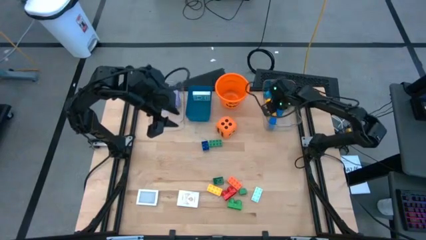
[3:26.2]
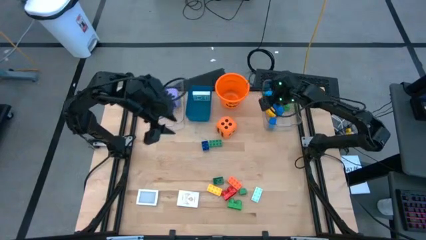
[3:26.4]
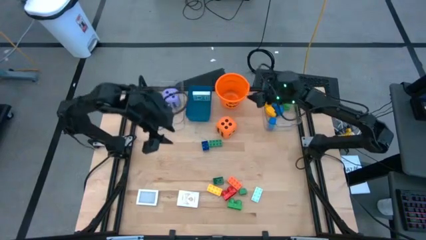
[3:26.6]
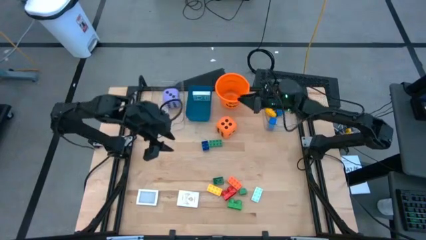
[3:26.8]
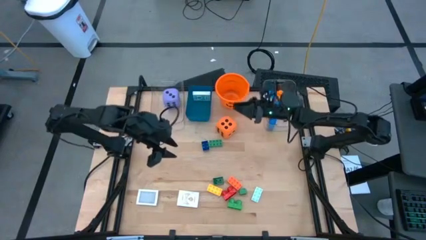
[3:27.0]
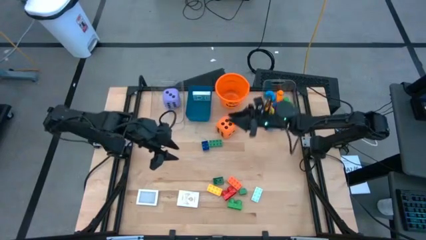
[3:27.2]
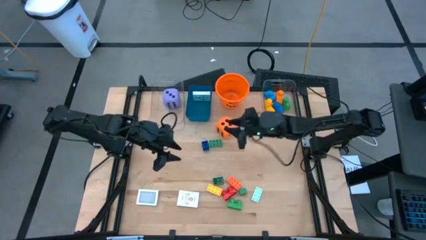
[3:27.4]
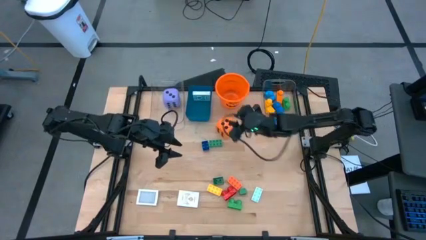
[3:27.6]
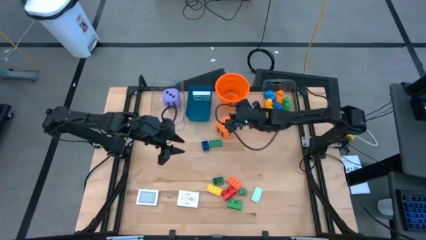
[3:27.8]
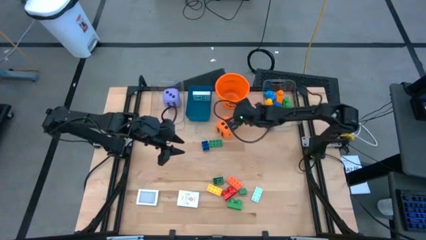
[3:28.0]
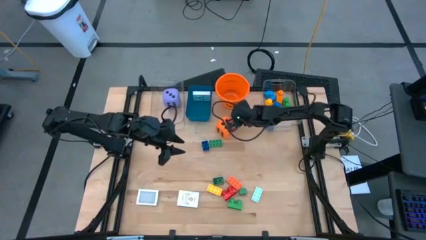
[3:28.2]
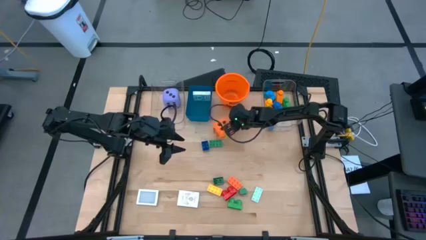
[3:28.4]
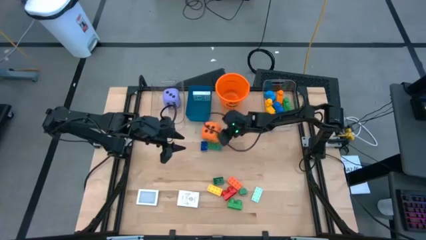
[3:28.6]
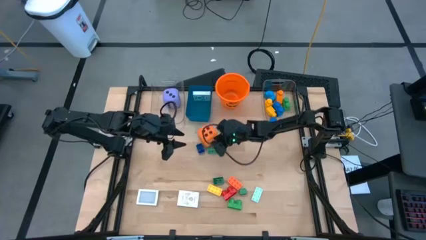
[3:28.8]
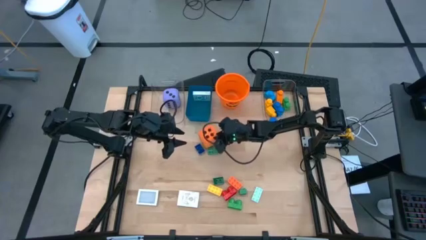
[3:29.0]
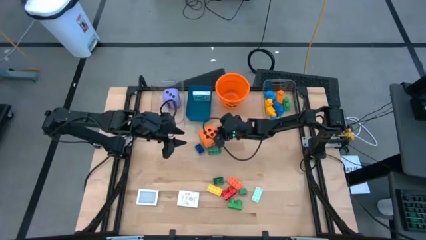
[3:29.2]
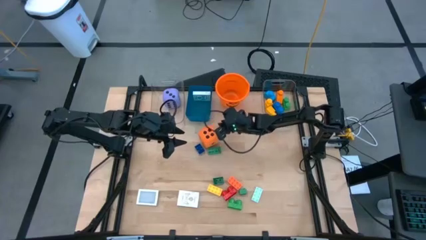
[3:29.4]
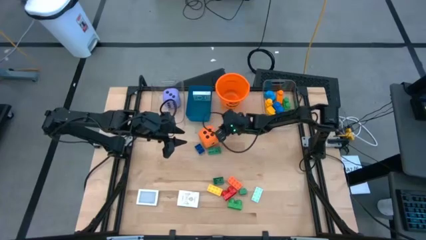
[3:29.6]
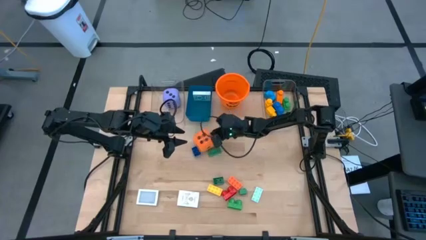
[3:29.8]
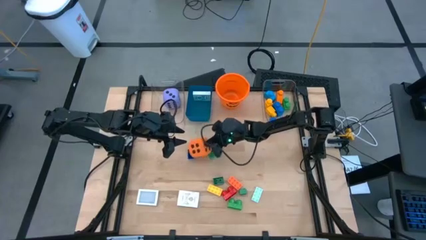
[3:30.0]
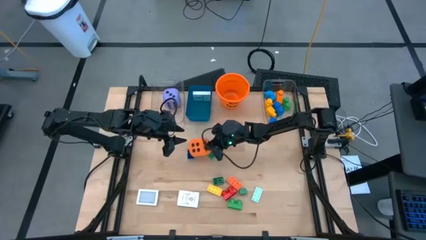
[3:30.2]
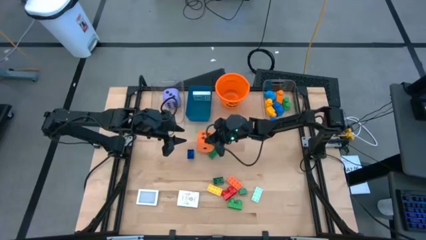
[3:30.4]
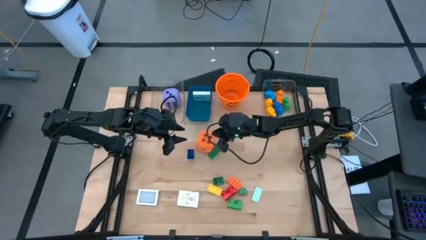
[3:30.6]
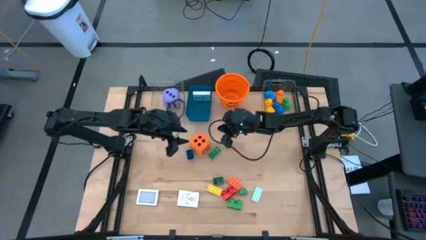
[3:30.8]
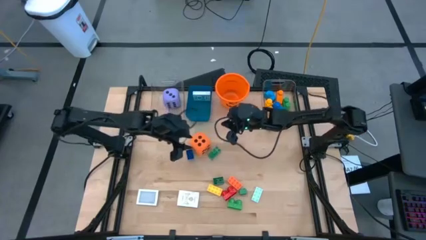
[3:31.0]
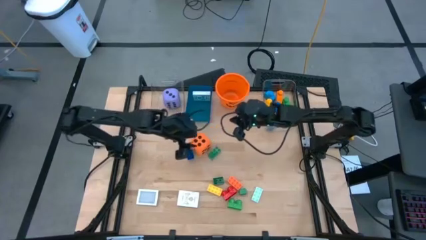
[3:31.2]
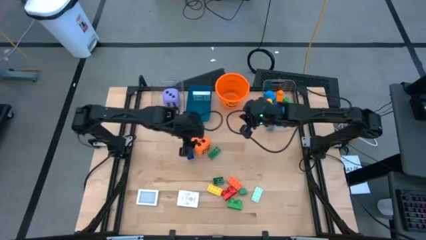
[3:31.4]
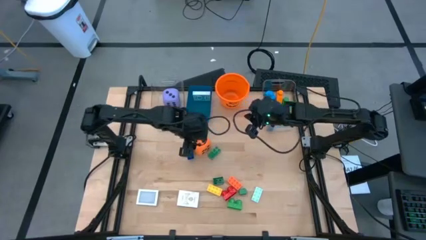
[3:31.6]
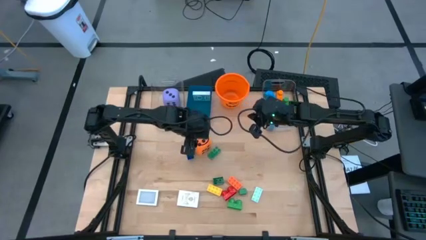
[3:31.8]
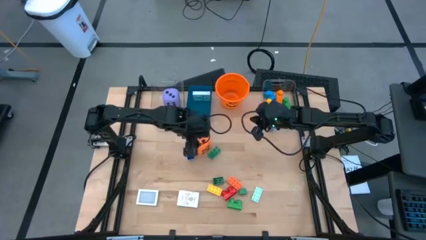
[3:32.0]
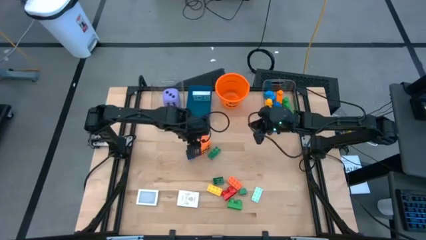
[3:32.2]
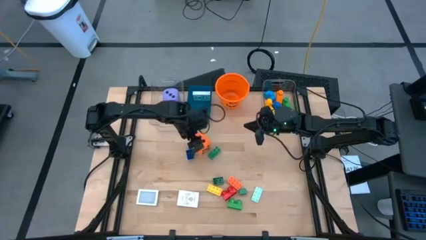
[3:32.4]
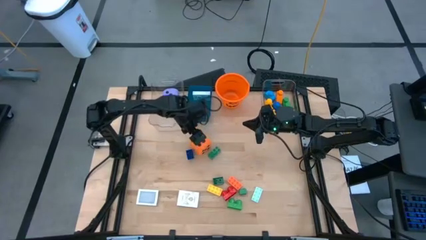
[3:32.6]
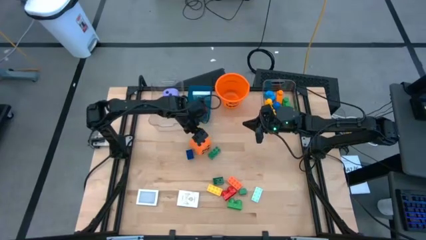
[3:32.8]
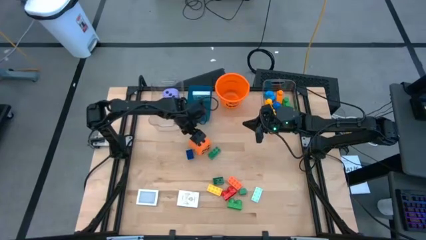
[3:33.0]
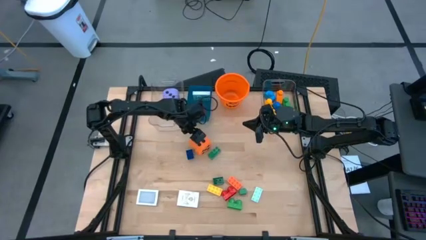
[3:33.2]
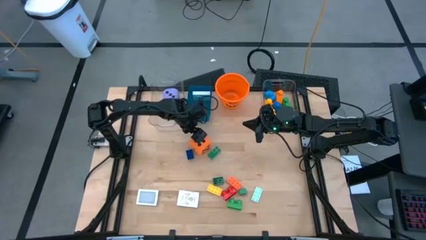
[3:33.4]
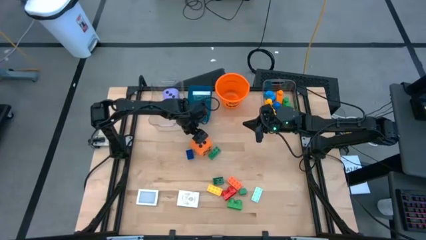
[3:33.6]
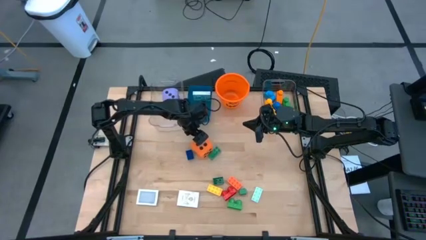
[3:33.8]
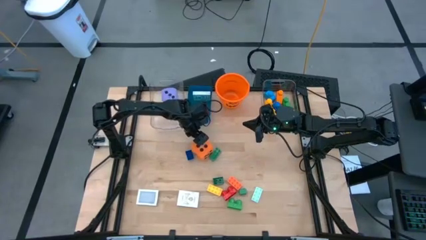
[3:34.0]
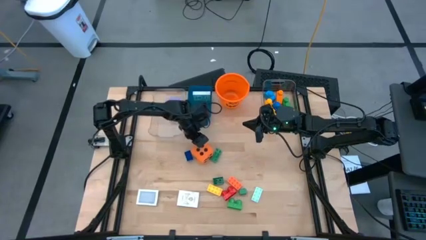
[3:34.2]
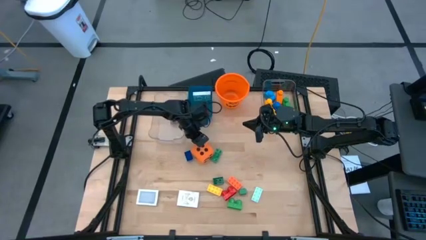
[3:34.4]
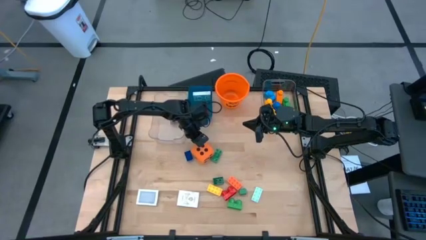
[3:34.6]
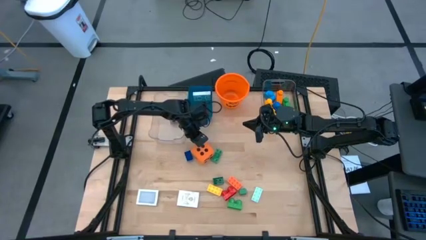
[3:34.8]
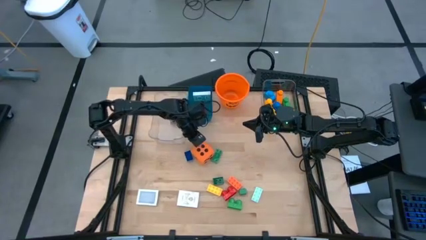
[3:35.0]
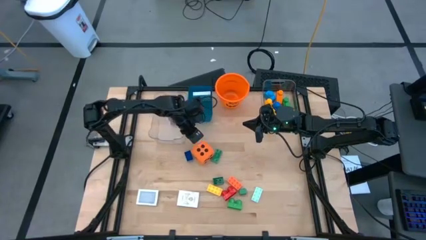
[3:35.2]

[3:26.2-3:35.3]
Task: Pick & Place Toys
Put the orange dice into the left transparent bin

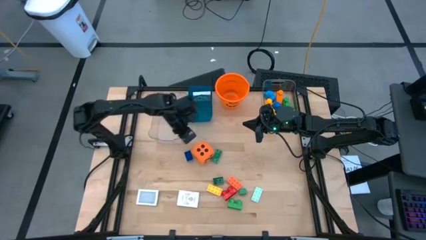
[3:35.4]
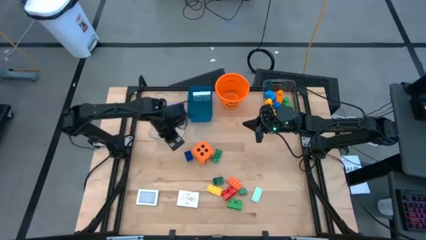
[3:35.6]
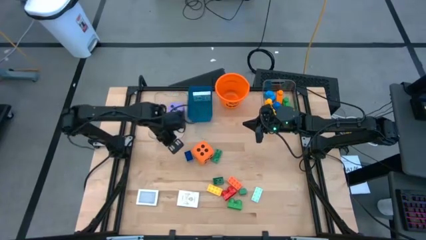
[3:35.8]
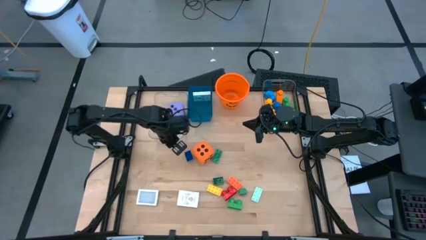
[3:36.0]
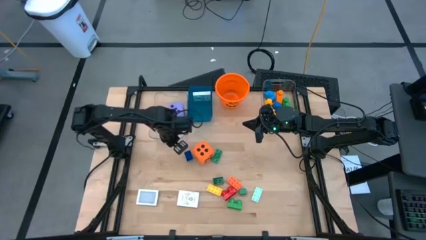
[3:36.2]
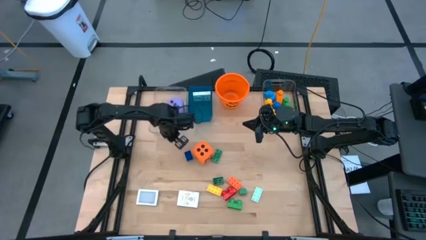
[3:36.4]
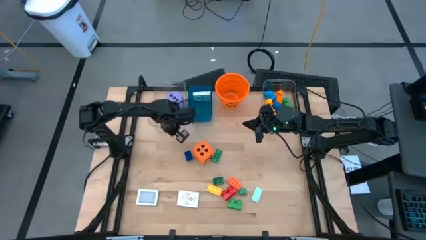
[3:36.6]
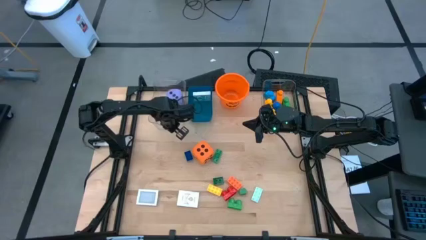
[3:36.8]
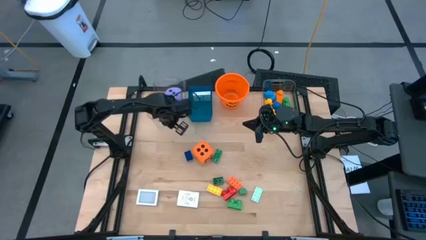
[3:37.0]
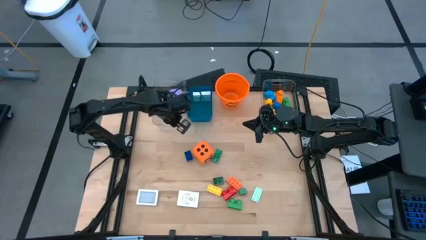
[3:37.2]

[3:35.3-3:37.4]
Adjust the left transparent bin
